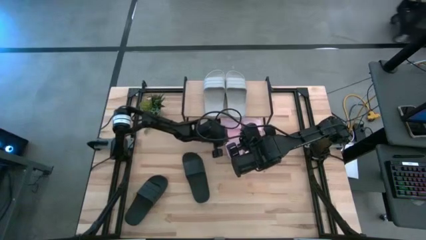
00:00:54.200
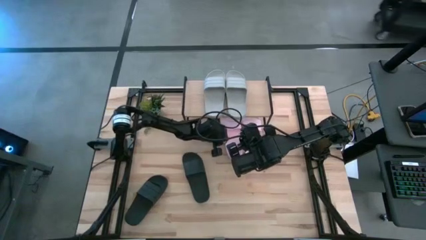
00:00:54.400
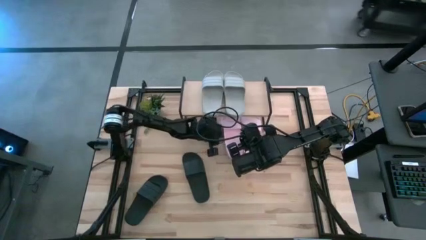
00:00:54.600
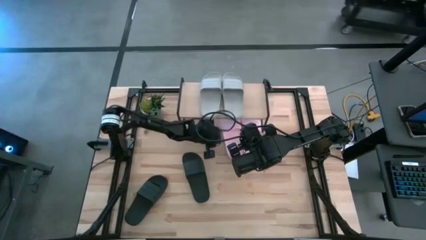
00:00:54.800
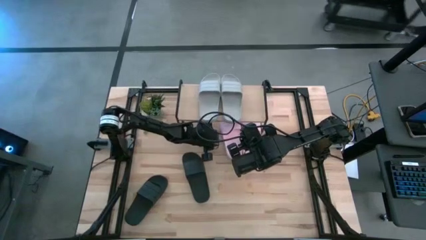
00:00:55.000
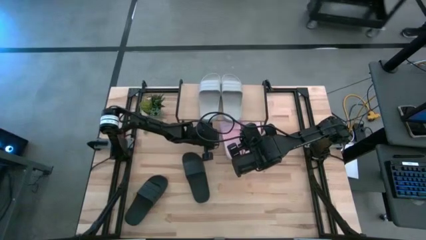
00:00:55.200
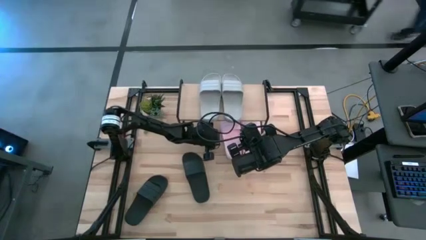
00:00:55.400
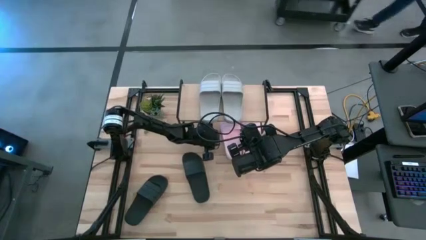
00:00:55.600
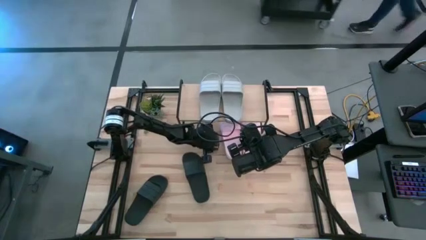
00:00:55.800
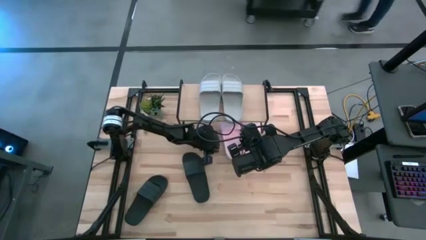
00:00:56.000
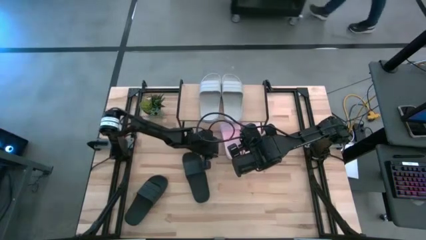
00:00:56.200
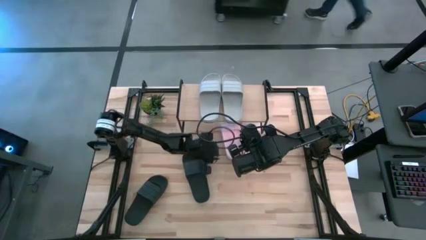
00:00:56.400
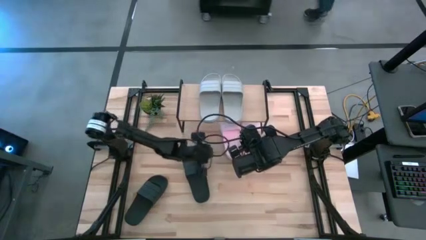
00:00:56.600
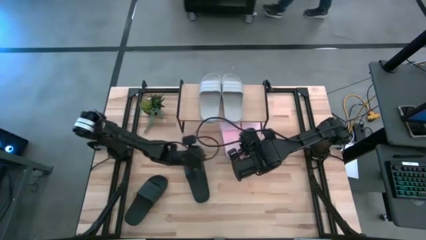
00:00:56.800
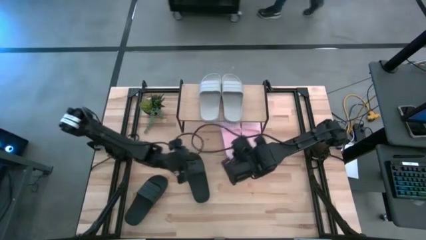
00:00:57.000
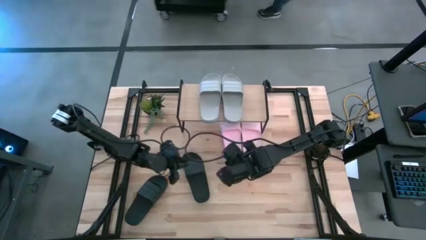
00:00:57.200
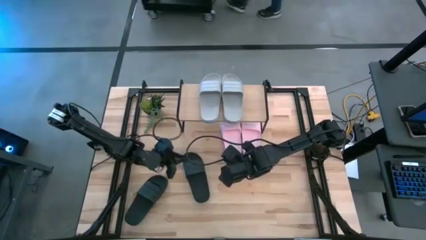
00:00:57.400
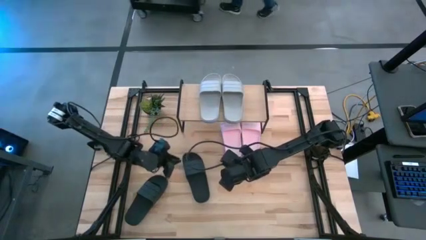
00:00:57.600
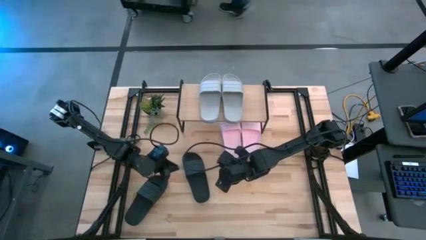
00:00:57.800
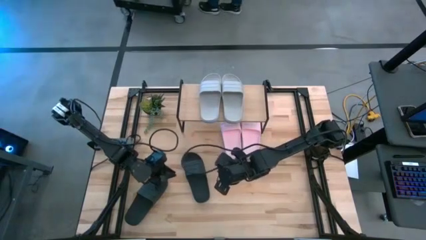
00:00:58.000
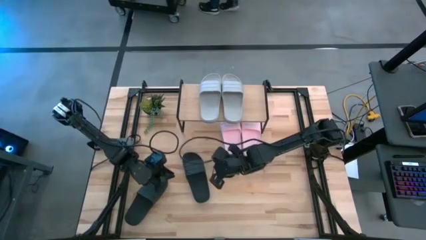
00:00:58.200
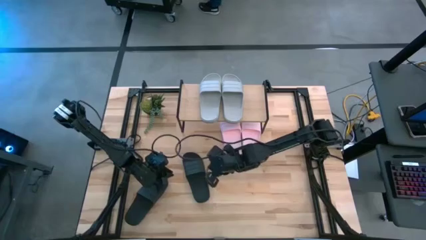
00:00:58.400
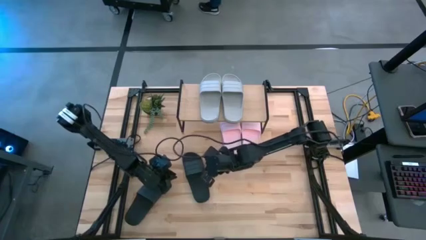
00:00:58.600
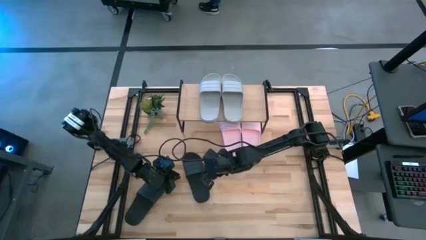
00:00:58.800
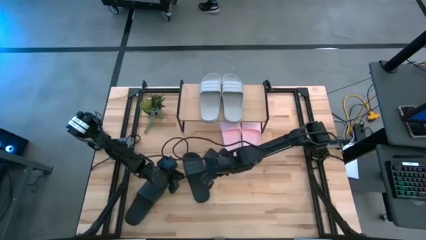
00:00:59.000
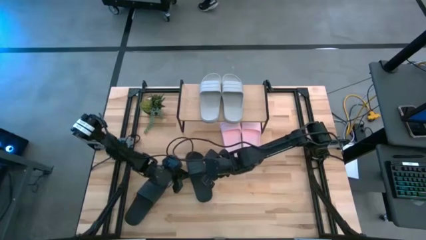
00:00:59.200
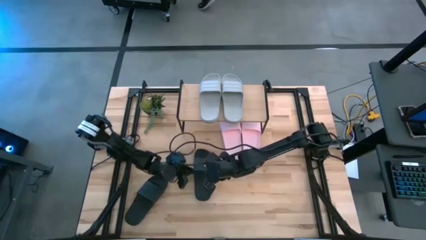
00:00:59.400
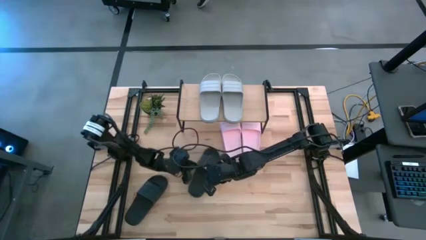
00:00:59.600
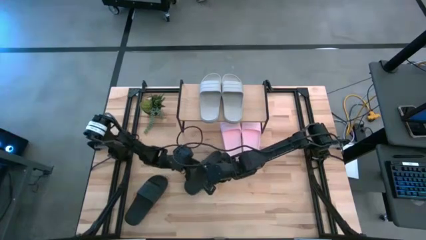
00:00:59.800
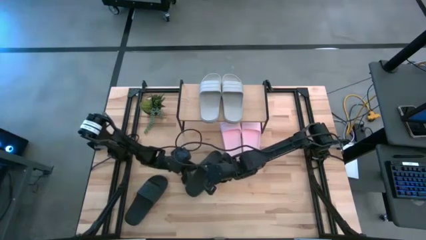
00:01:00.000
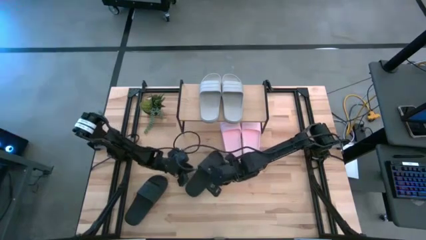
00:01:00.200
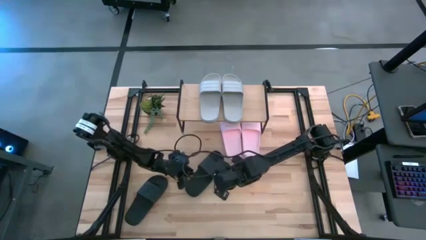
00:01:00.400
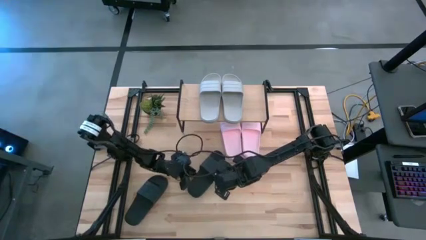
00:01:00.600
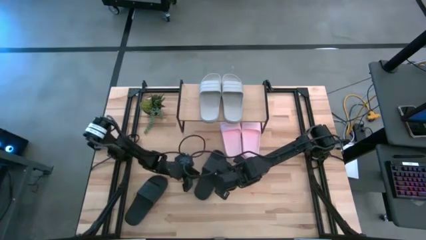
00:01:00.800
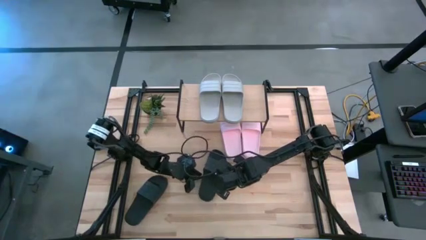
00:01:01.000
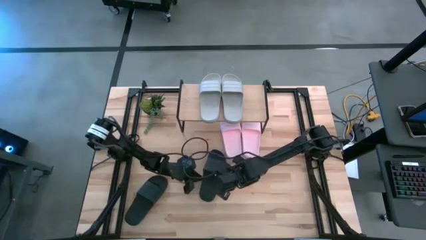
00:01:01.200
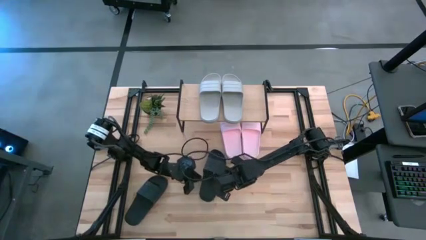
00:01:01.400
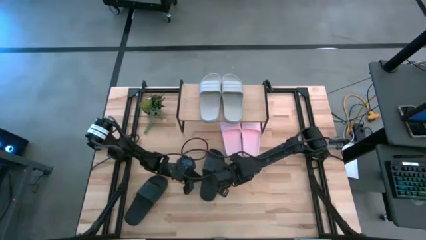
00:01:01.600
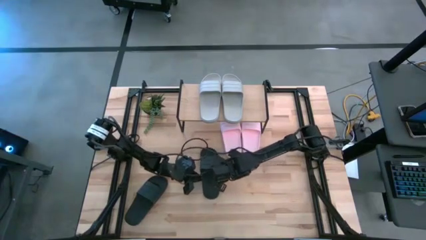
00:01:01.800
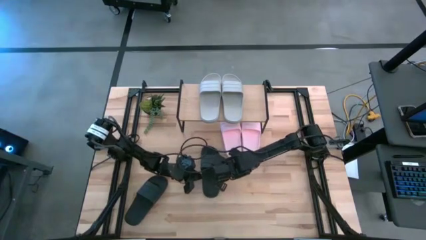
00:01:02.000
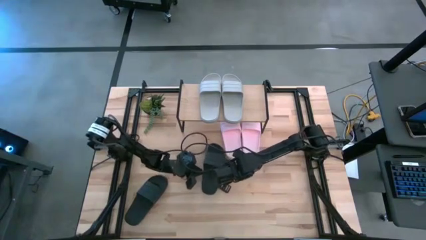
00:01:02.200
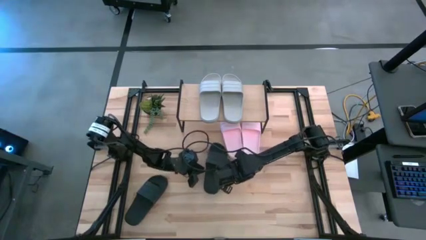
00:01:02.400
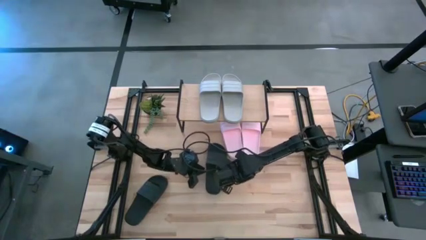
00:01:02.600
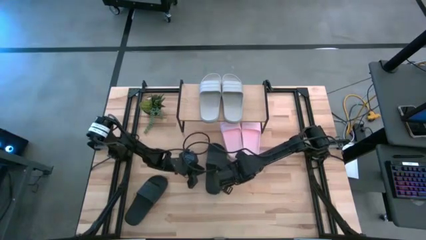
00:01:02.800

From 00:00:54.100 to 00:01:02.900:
Task: Pick and place slides into the shelf
Move the right black slide to the centre on the table

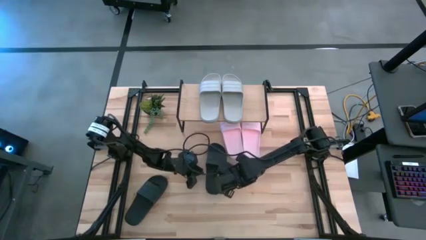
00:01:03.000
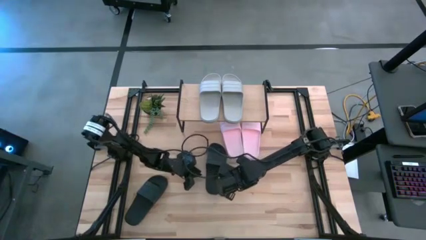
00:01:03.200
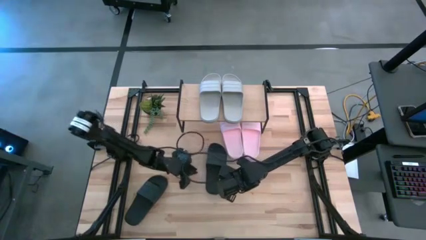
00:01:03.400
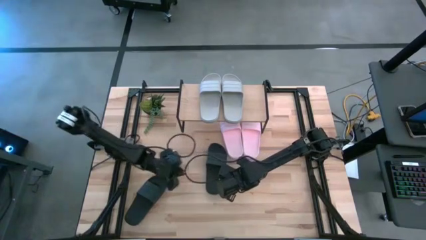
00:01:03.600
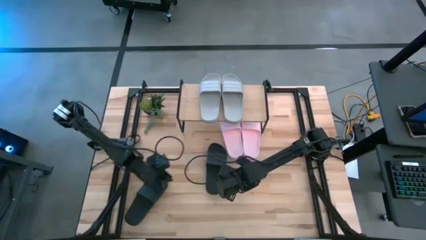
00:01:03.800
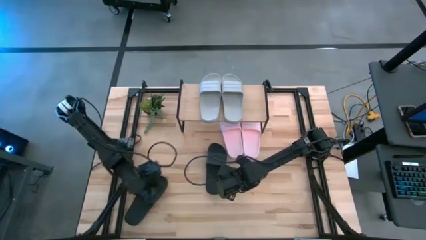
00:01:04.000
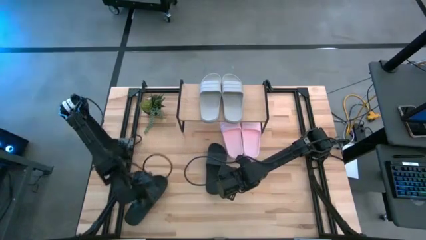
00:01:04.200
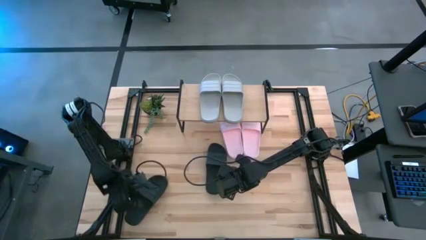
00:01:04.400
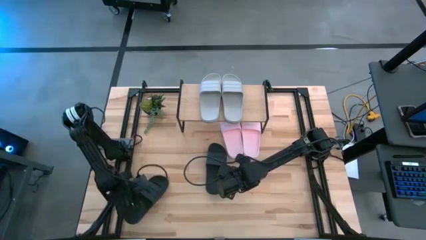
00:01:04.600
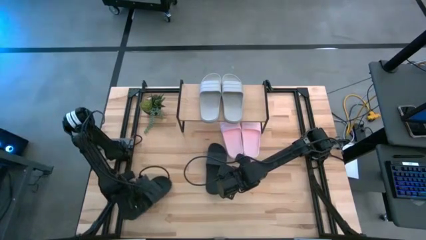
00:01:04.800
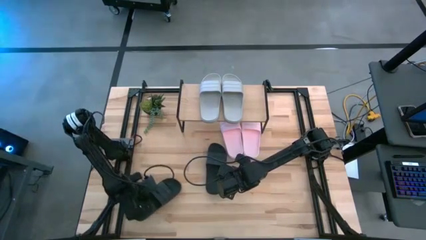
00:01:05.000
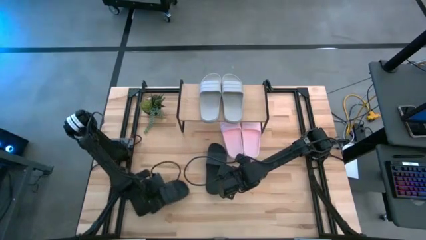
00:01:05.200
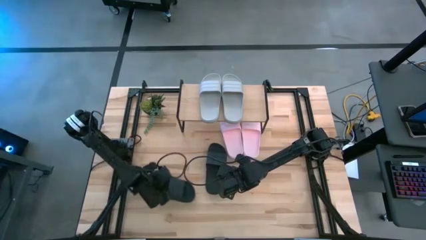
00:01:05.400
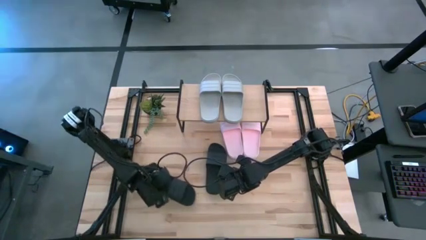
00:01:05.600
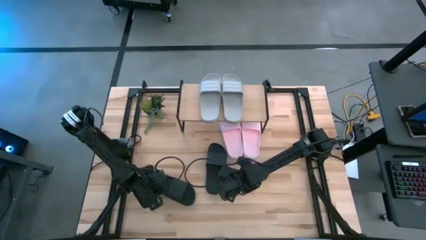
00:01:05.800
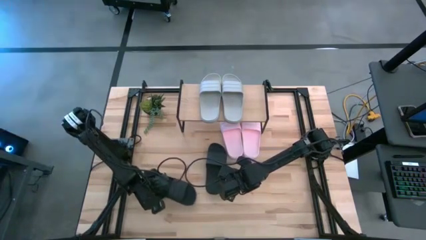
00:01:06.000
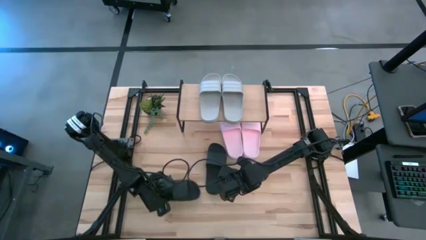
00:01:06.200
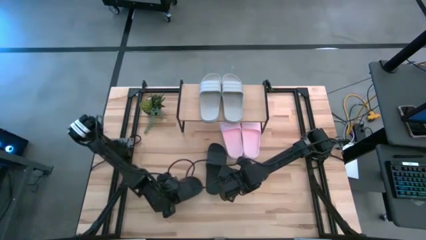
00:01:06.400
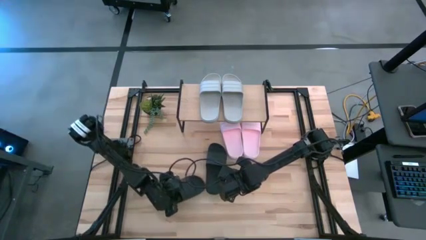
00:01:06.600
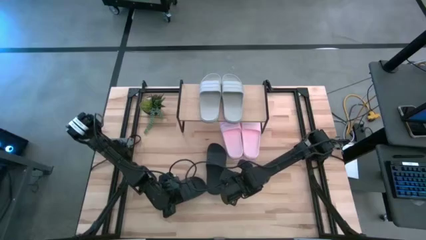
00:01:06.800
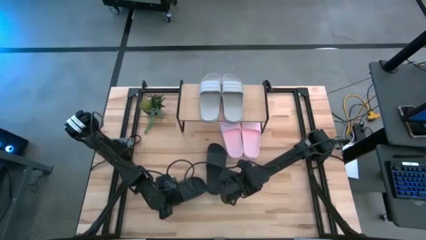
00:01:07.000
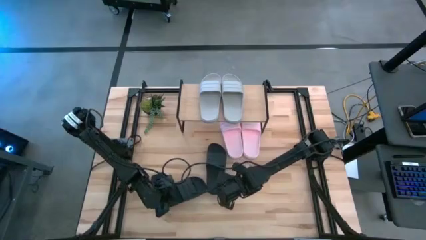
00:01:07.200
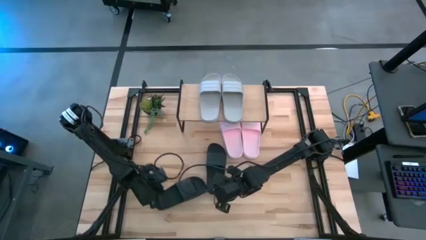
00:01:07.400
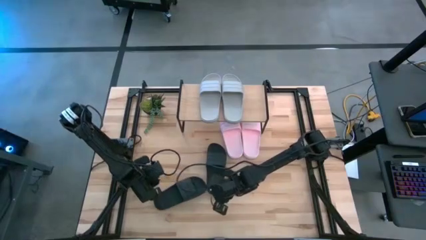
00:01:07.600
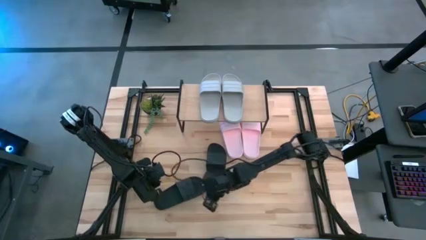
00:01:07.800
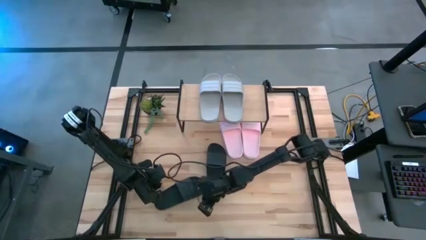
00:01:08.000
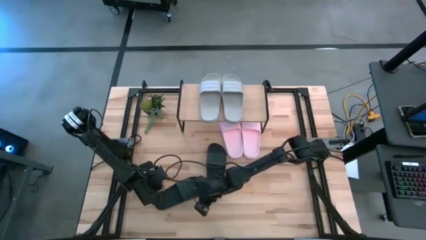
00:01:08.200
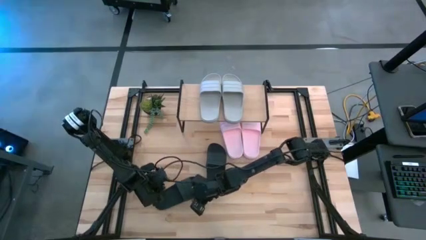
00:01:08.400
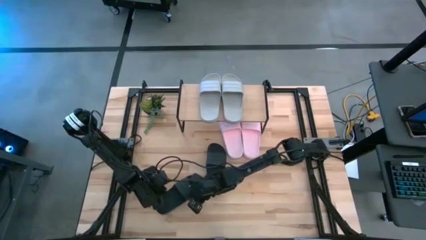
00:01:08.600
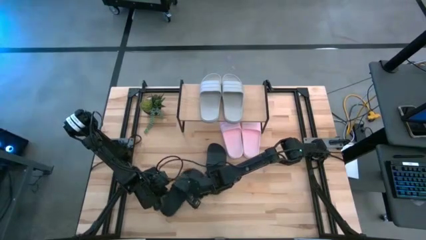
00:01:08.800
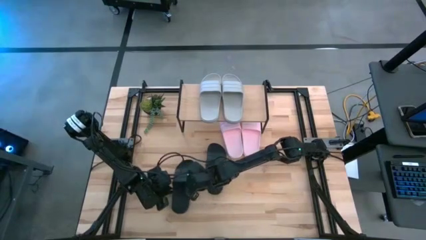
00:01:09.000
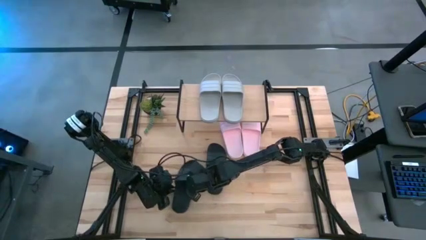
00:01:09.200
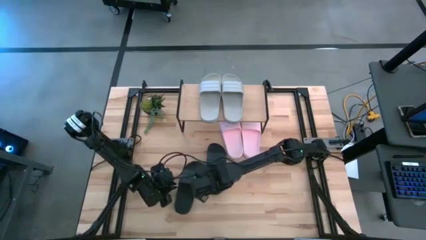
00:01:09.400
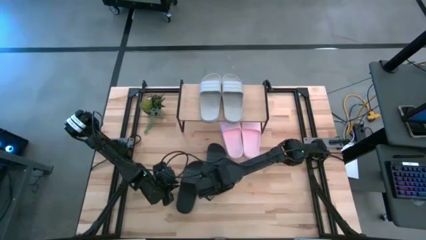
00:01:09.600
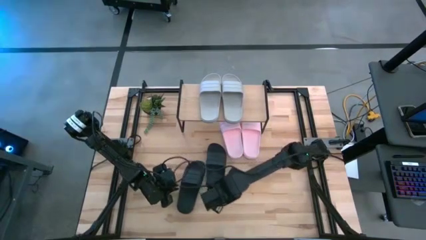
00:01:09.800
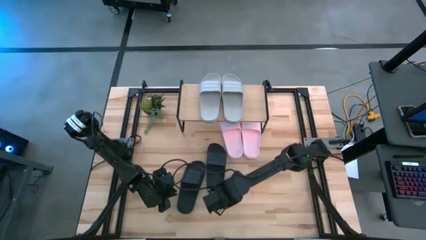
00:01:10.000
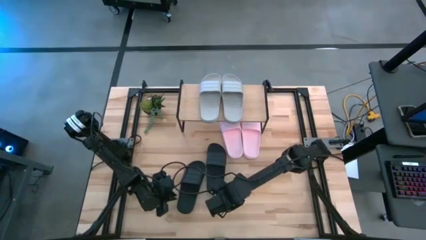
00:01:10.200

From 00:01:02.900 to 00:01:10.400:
Move the left black slide to the centre on the table

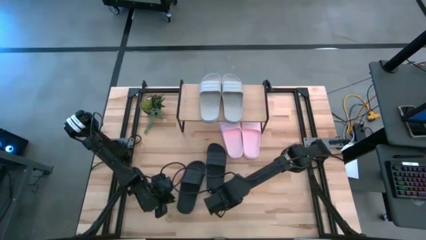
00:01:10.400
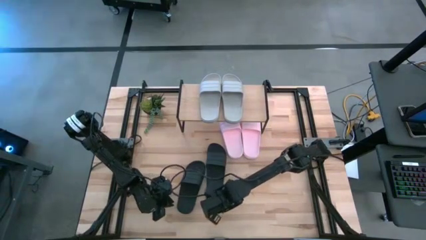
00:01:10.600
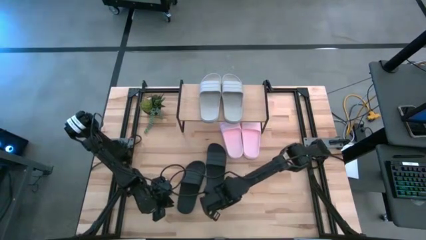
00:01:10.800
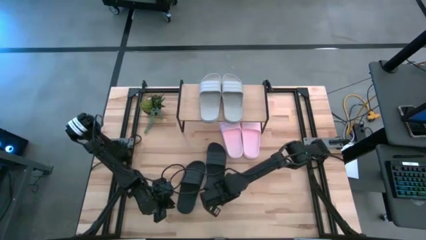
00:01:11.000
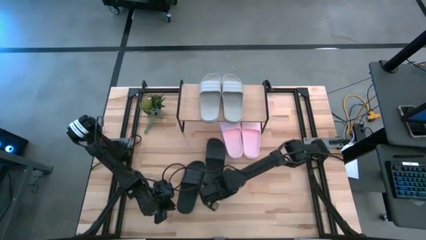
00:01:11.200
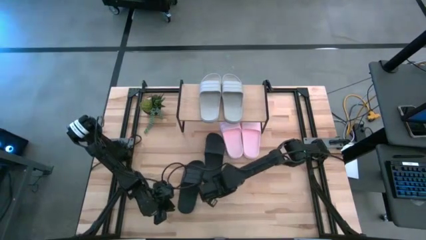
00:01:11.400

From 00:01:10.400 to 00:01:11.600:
Adjust the right black slide on the table
